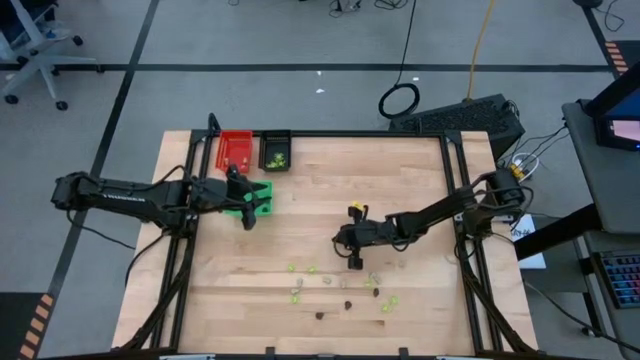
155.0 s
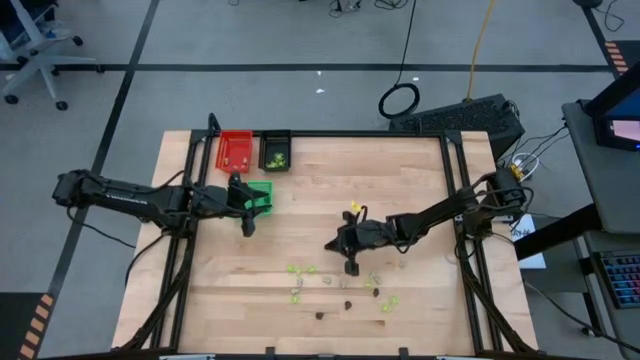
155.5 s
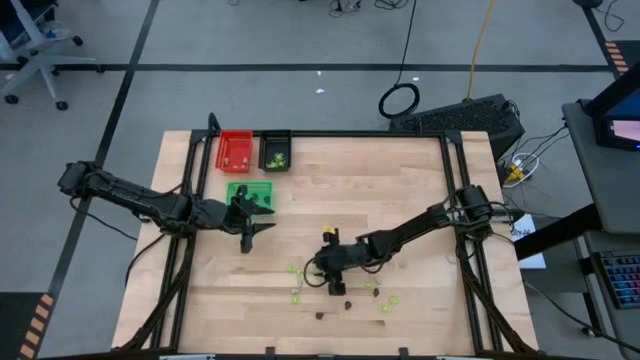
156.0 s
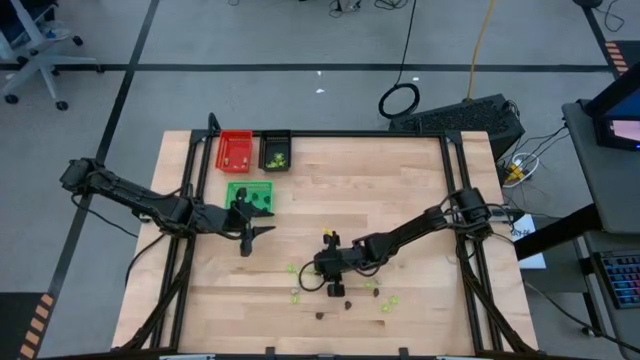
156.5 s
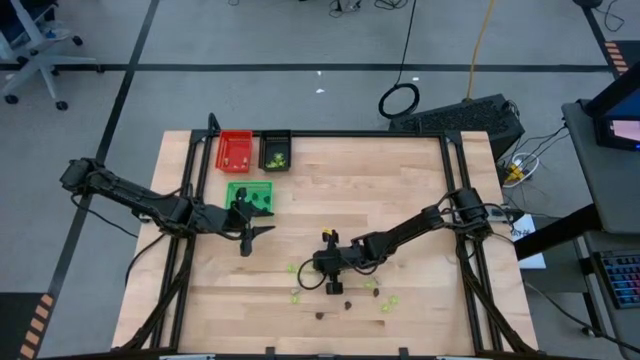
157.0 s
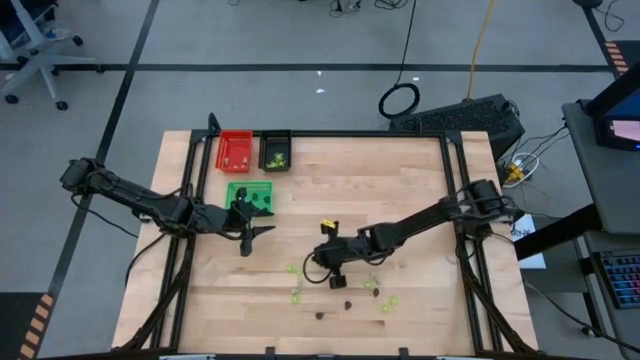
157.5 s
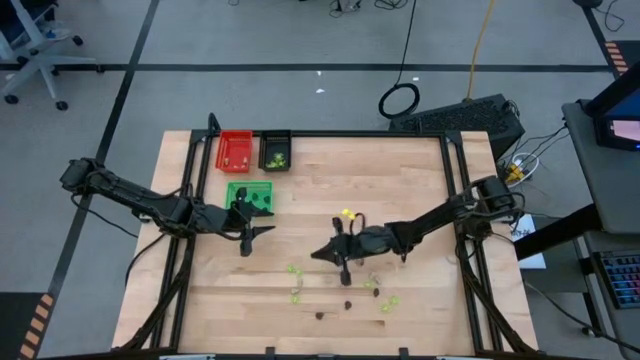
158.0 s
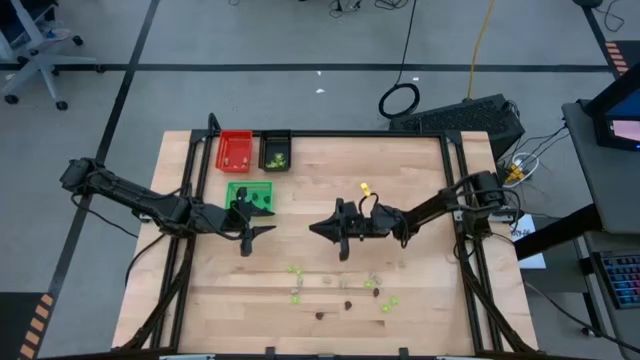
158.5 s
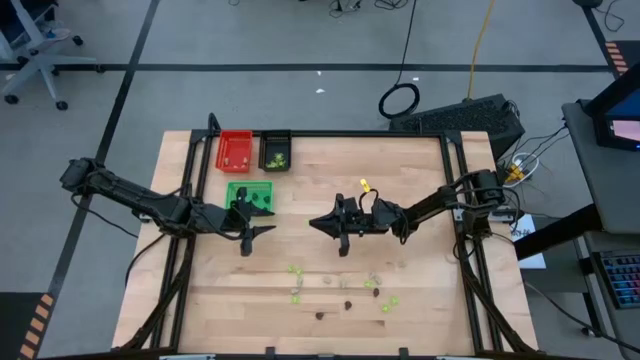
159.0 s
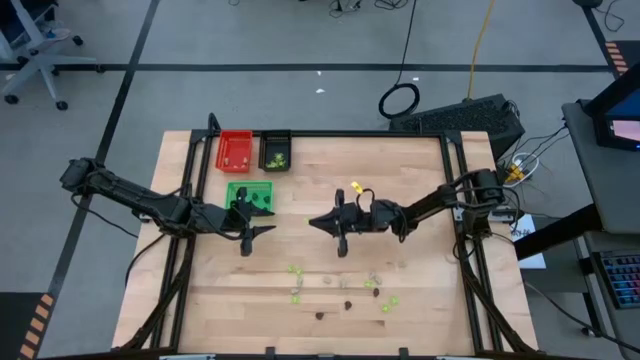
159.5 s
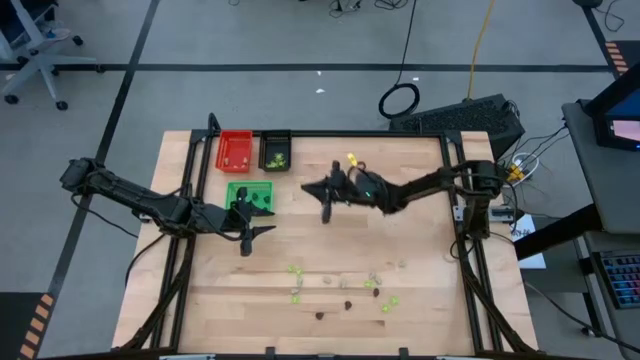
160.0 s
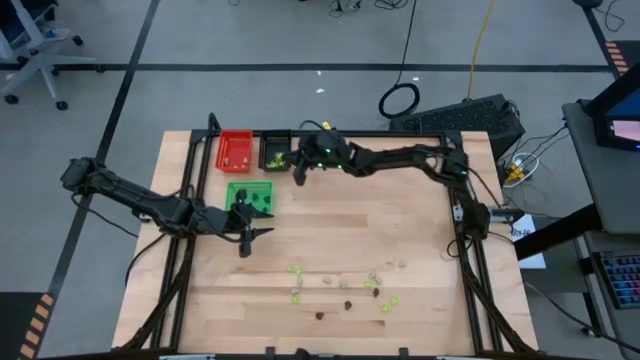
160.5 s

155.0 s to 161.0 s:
Task: Sort Halloween decoration
Put the green spider toy into the black bin

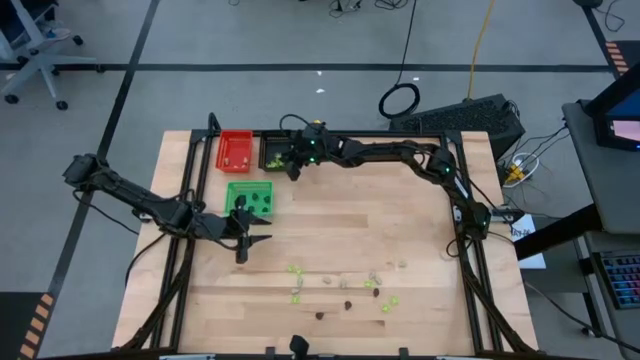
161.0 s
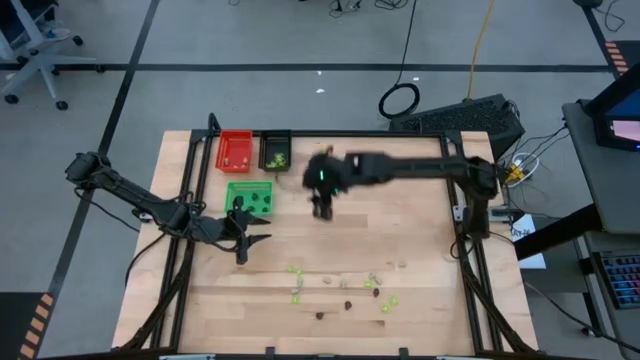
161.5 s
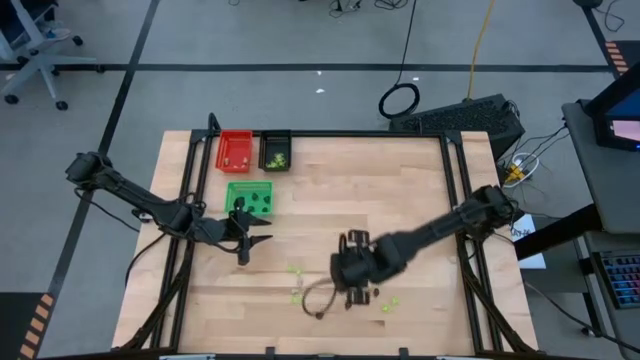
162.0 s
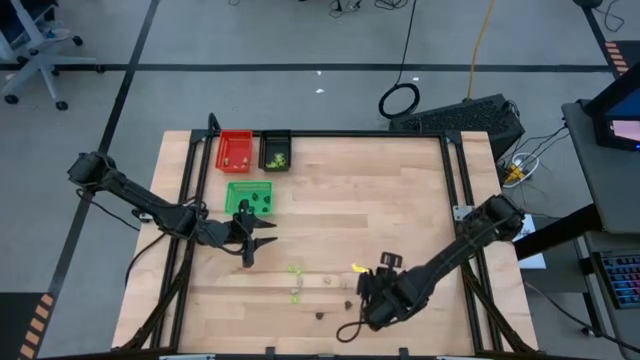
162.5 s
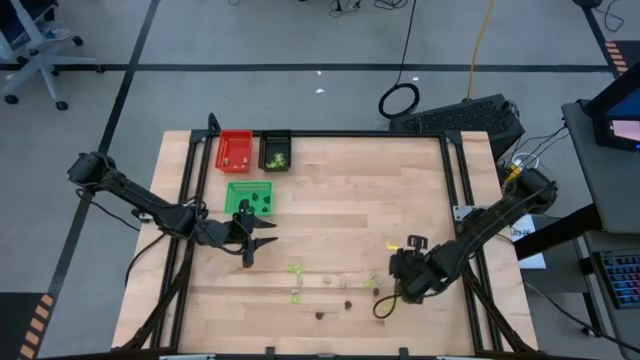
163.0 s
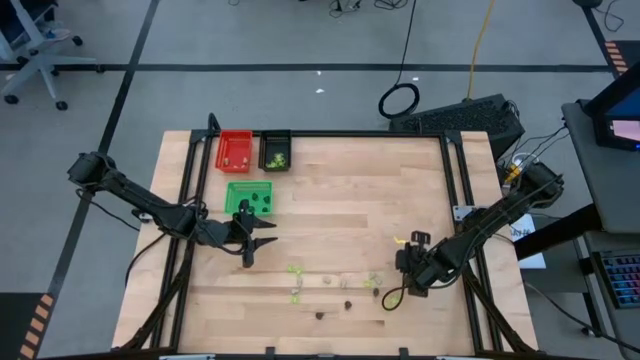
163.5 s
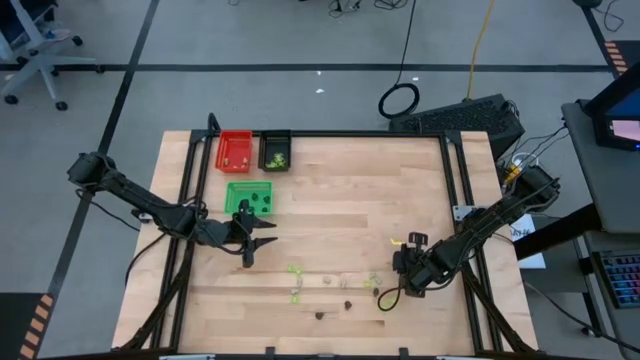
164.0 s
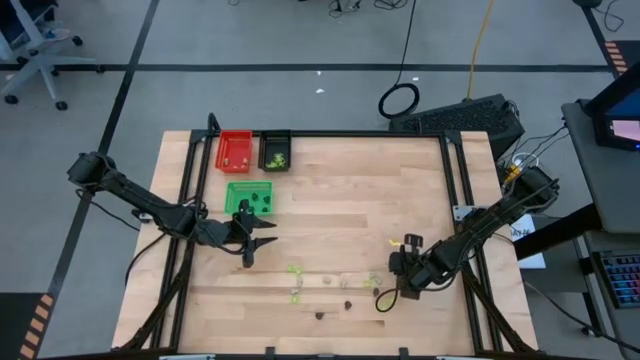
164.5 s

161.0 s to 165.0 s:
Put the white skull toy into the red bin

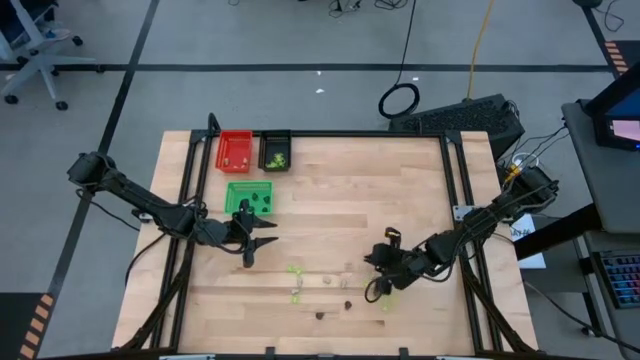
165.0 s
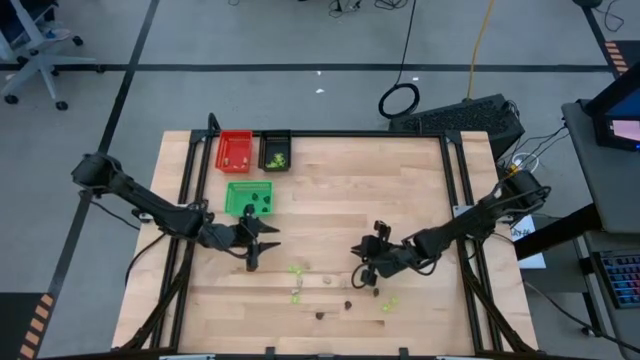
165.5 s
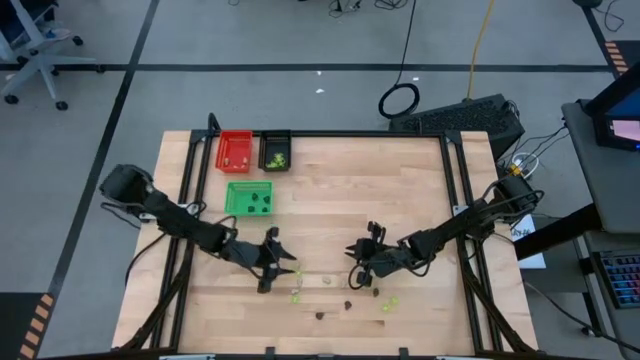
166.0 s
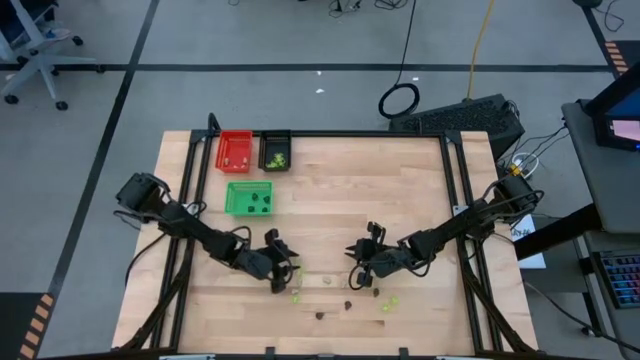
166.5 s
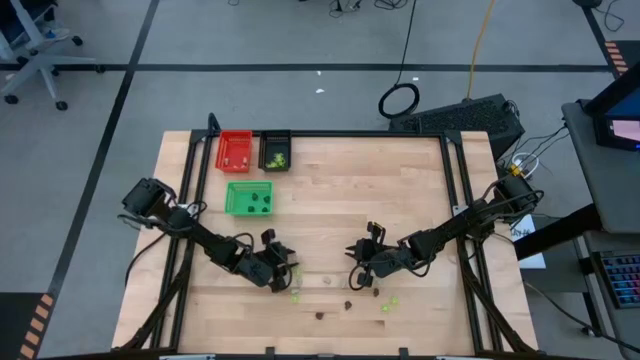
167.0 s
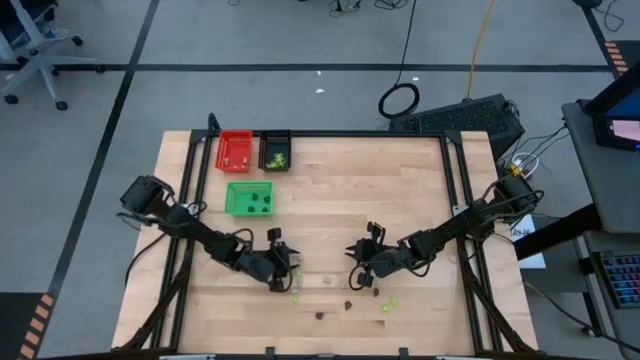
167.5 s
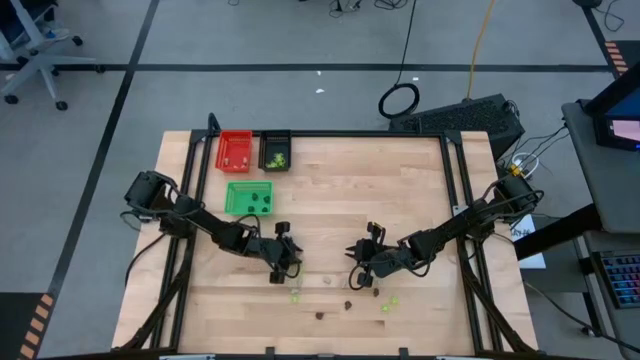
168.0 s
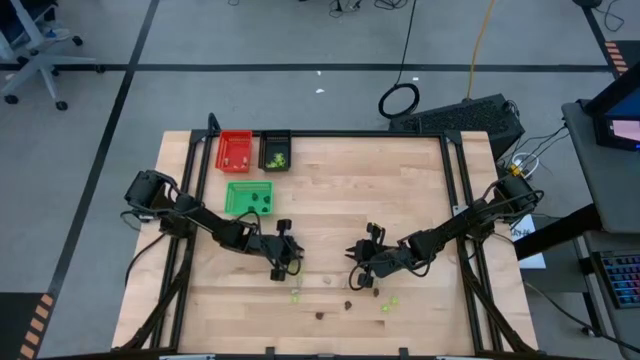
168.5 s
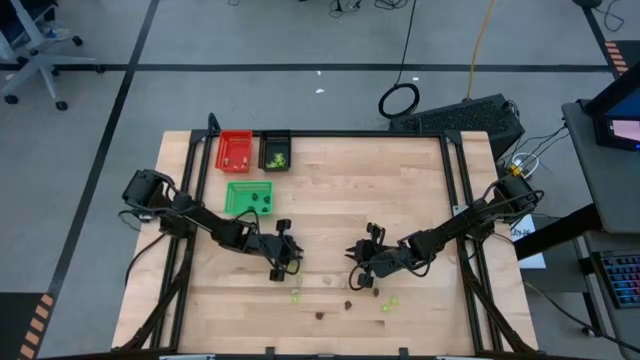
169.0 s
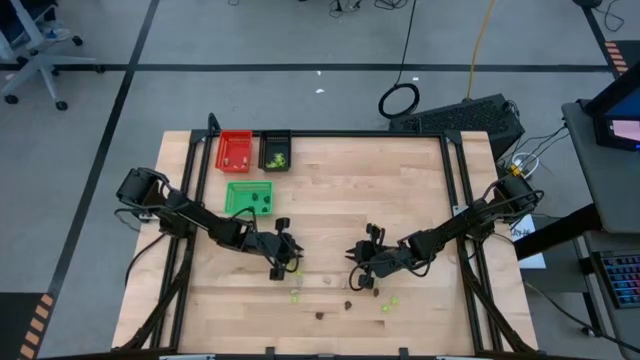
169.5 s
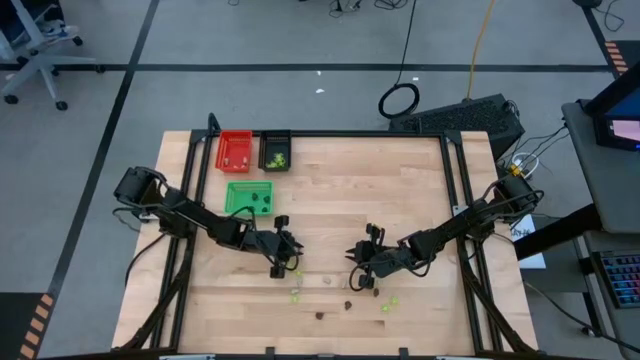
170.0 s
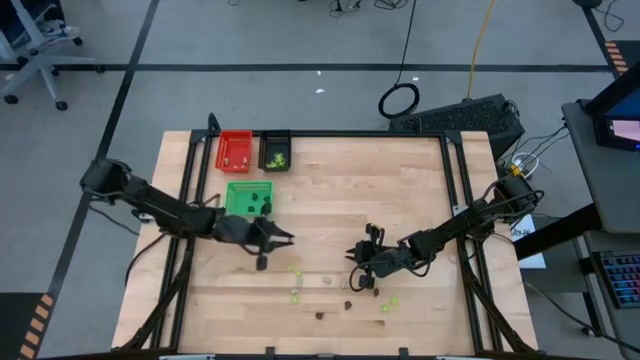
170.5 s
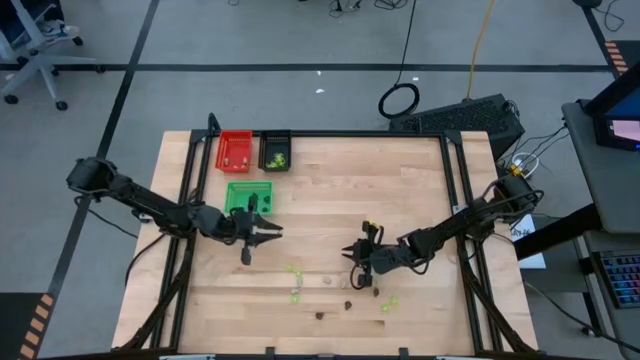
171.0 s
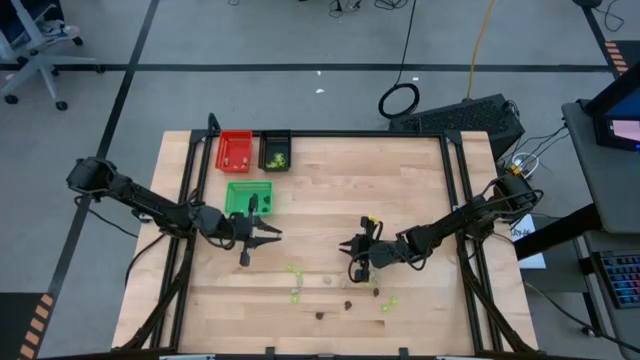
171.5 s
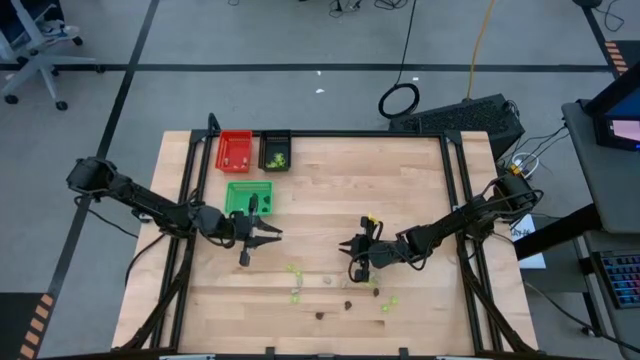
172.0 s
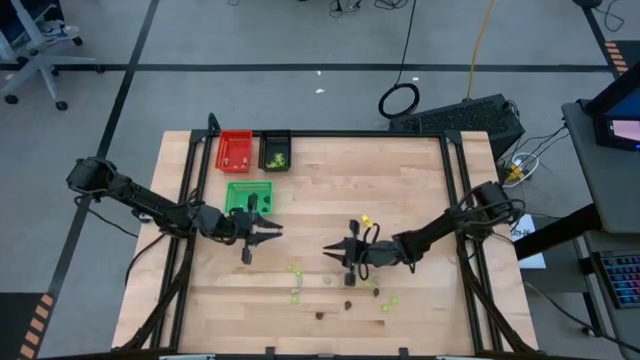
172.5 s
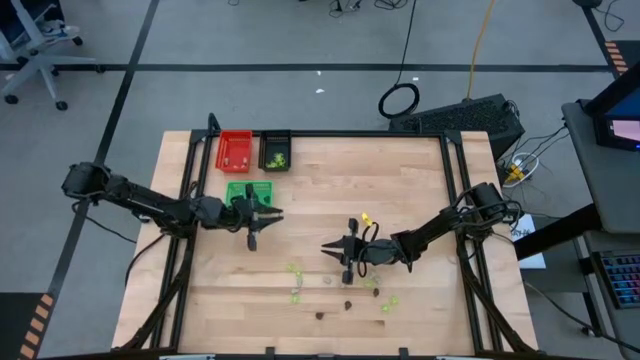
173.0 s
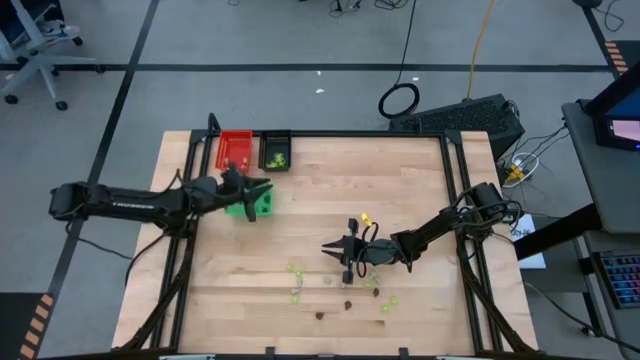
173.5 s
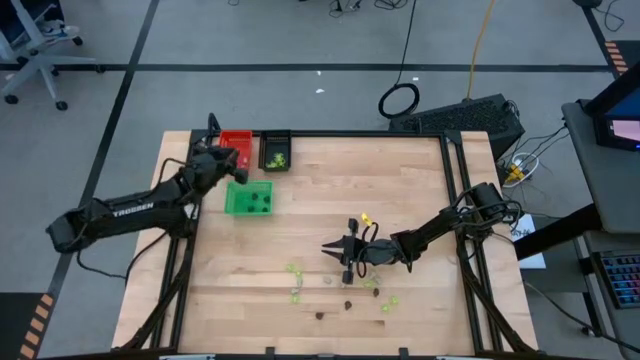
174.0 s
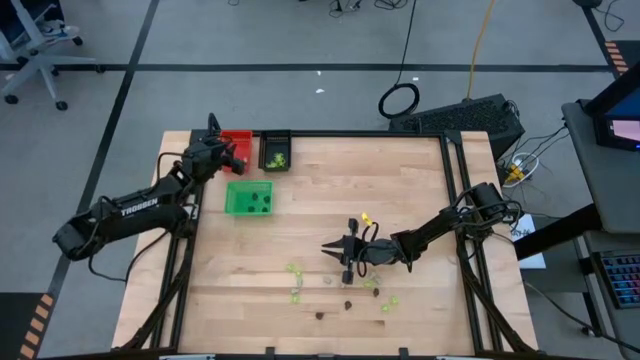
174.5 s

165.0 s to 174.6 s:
Put the white skull toy into the red bin
